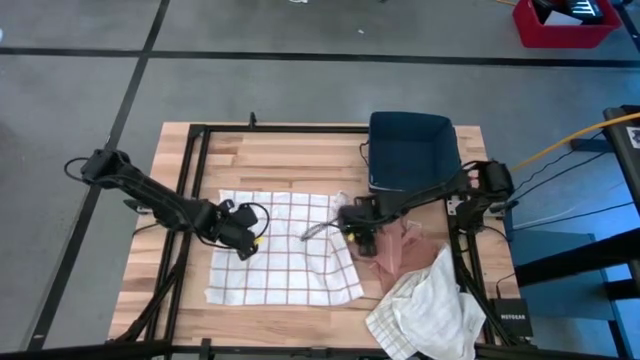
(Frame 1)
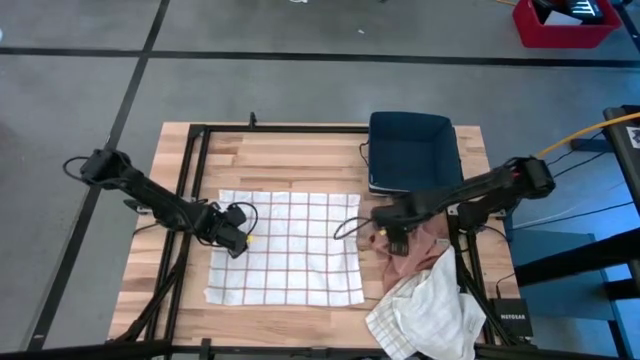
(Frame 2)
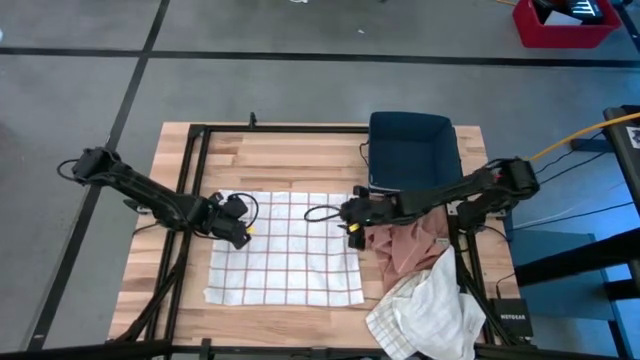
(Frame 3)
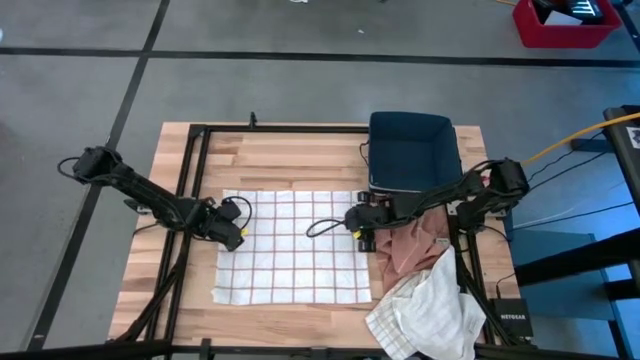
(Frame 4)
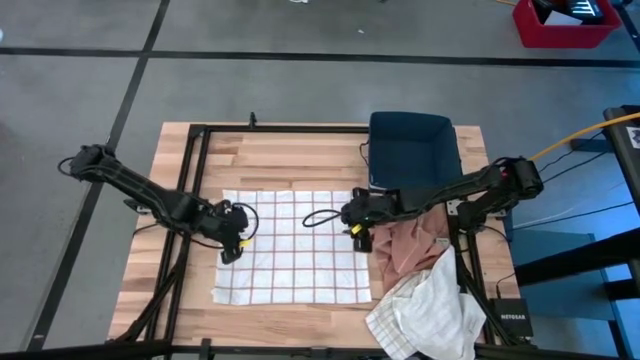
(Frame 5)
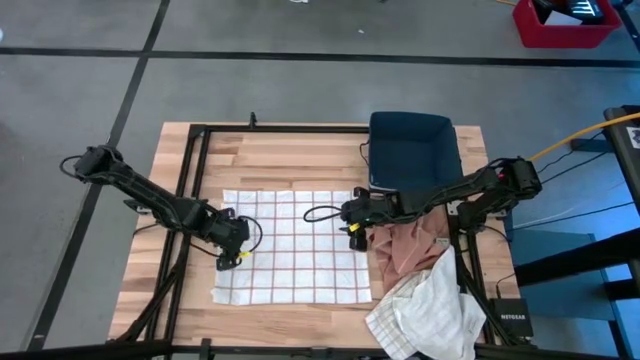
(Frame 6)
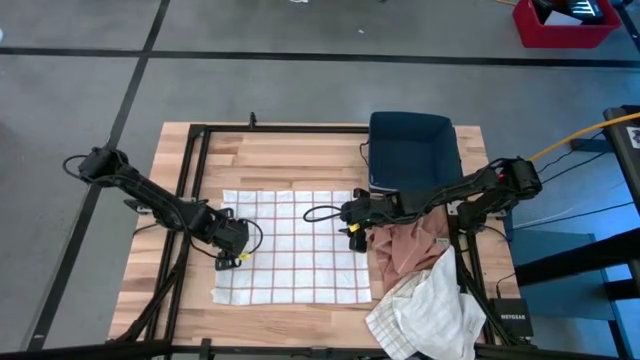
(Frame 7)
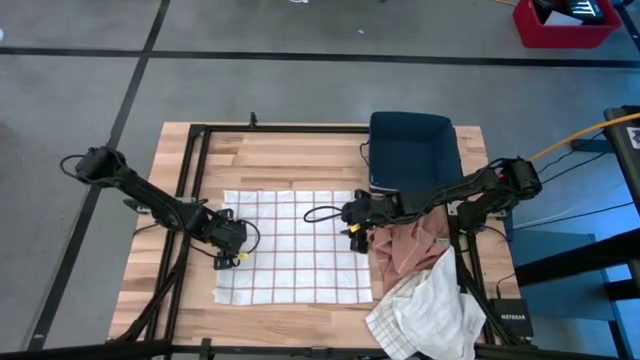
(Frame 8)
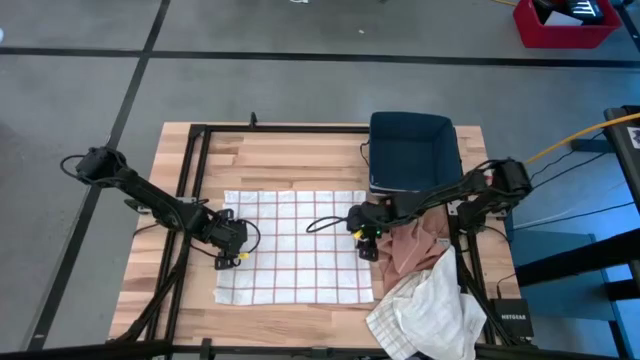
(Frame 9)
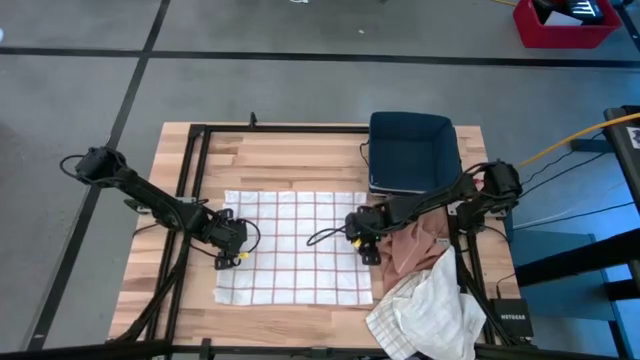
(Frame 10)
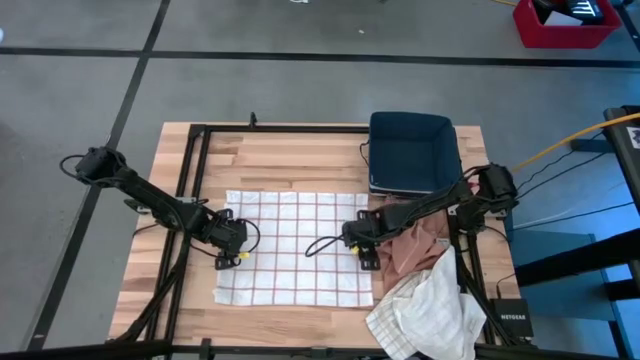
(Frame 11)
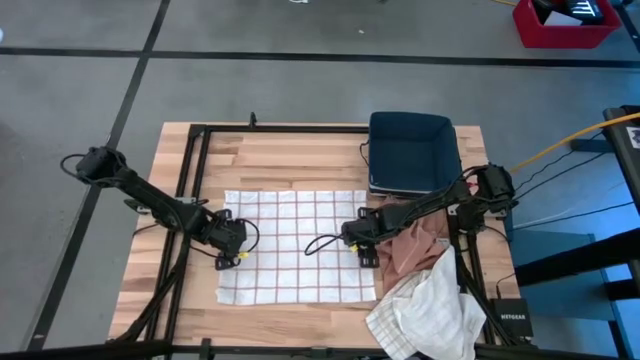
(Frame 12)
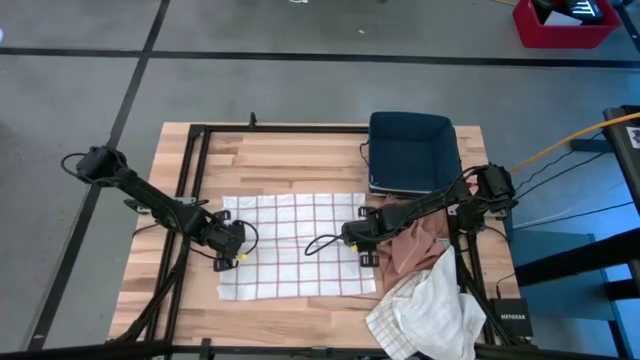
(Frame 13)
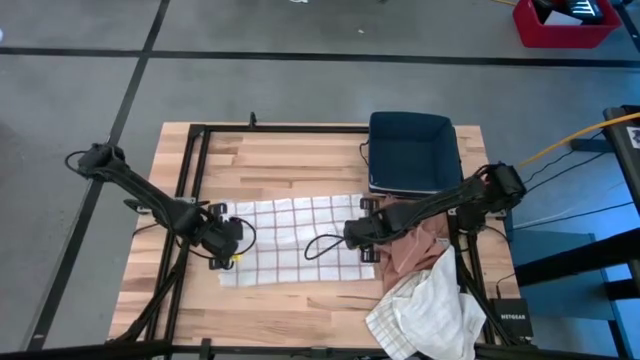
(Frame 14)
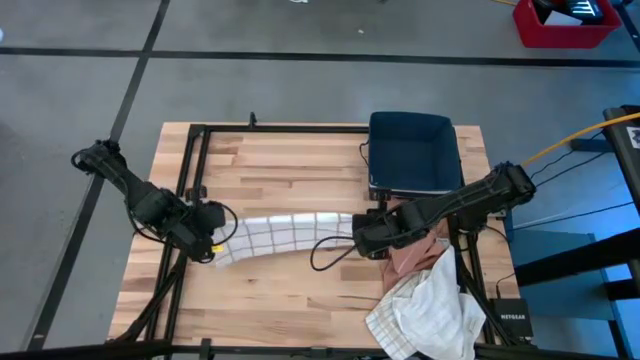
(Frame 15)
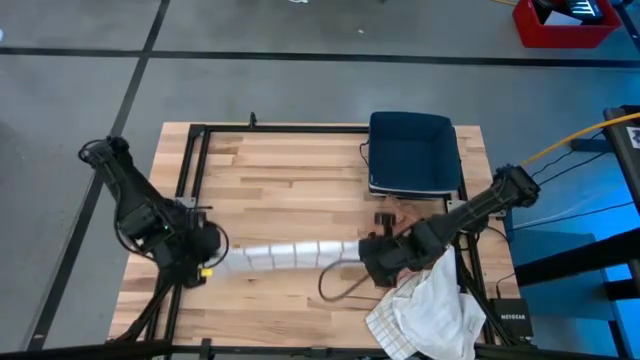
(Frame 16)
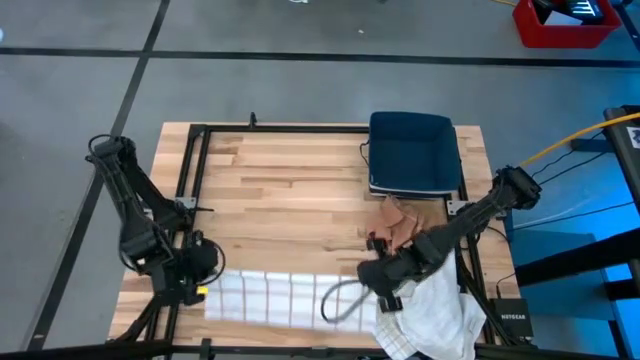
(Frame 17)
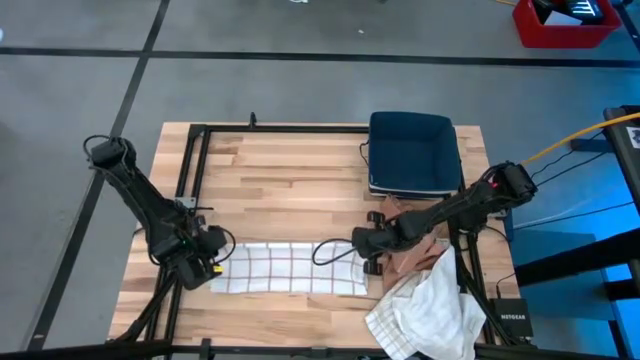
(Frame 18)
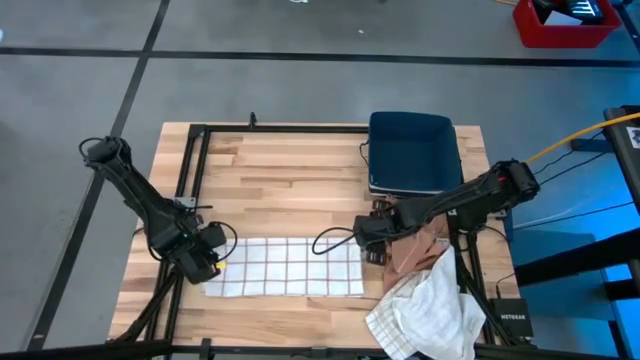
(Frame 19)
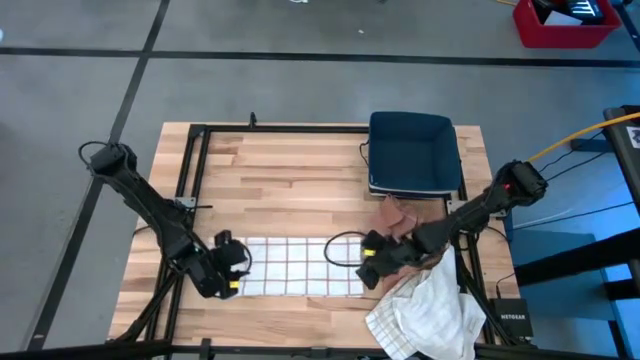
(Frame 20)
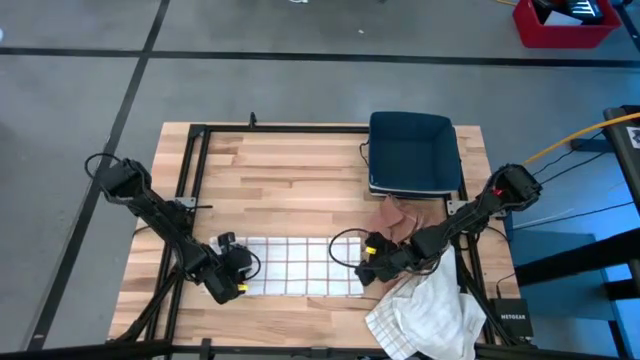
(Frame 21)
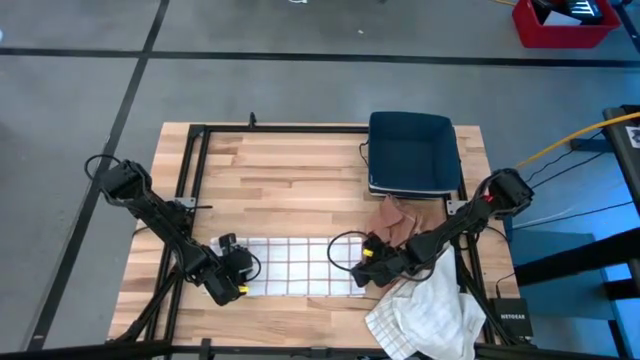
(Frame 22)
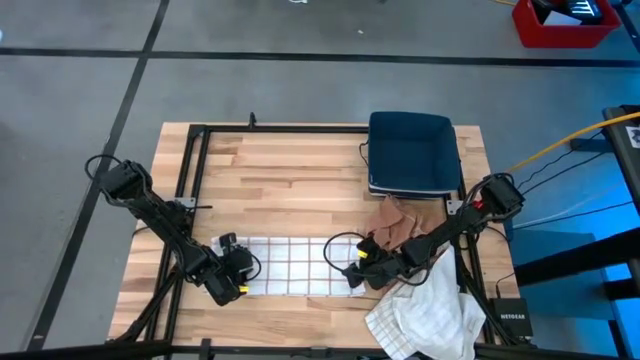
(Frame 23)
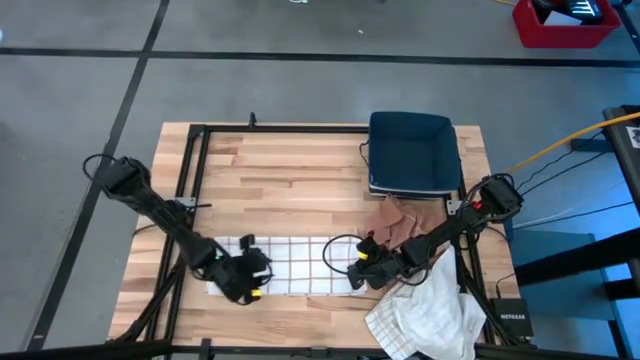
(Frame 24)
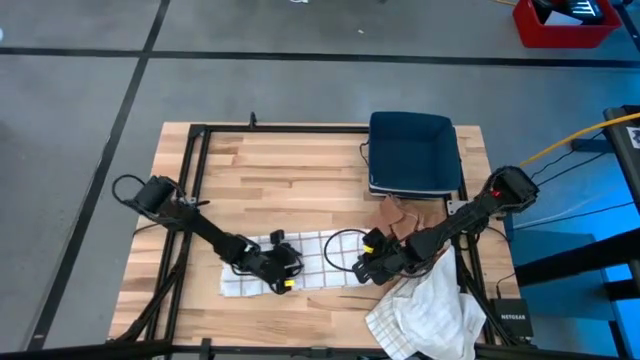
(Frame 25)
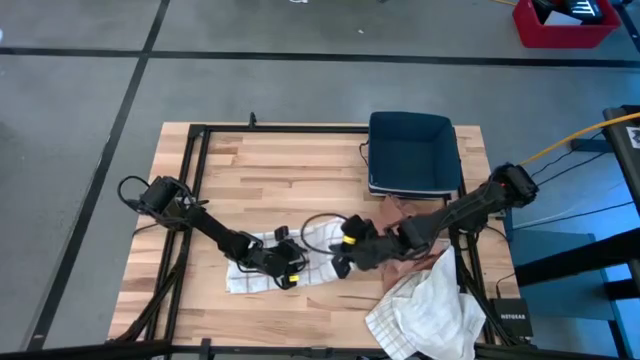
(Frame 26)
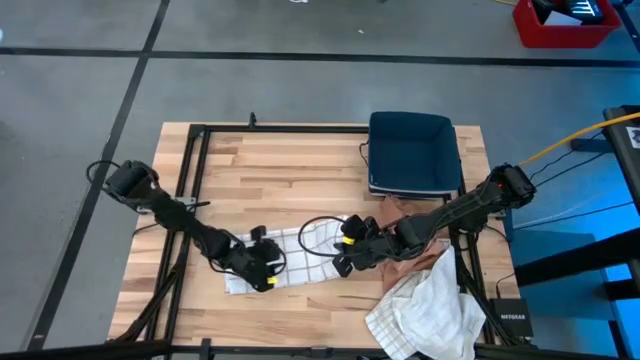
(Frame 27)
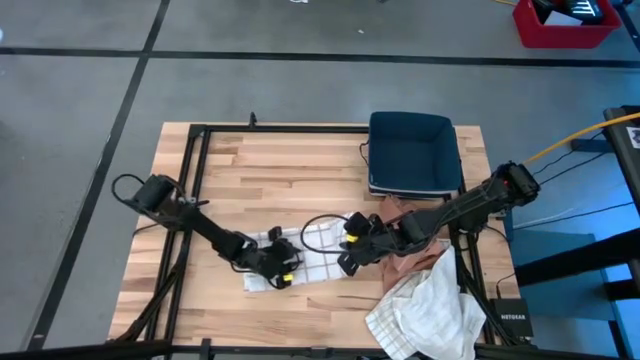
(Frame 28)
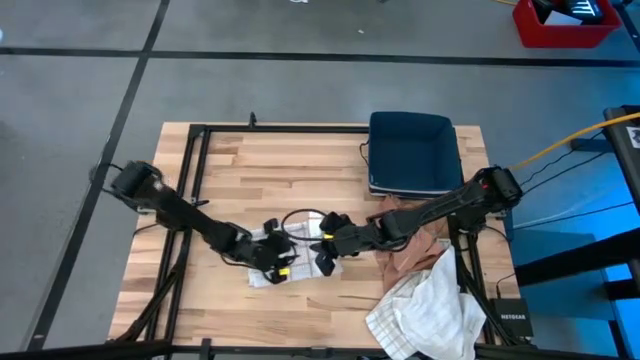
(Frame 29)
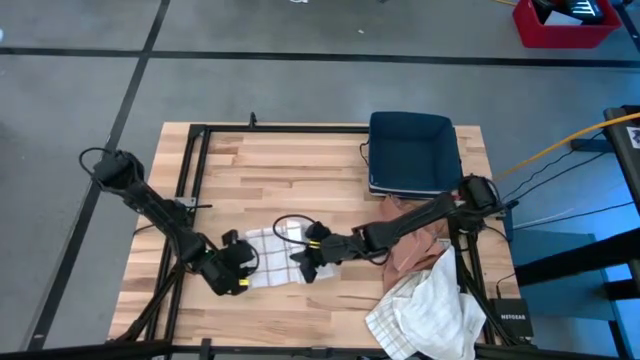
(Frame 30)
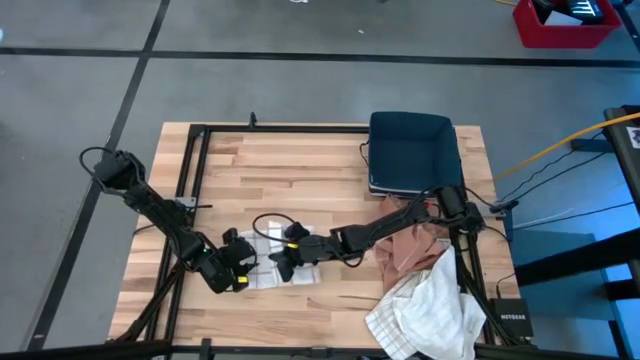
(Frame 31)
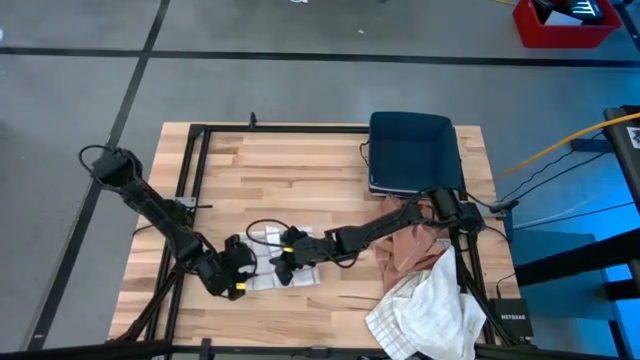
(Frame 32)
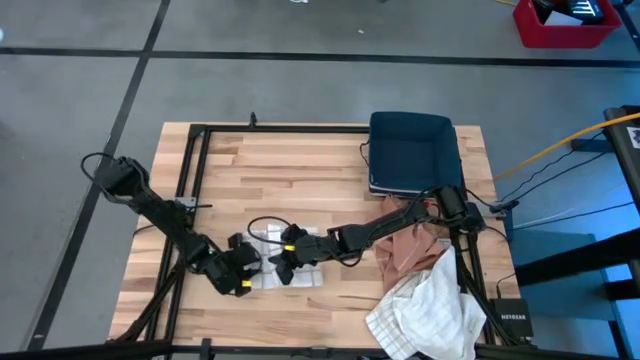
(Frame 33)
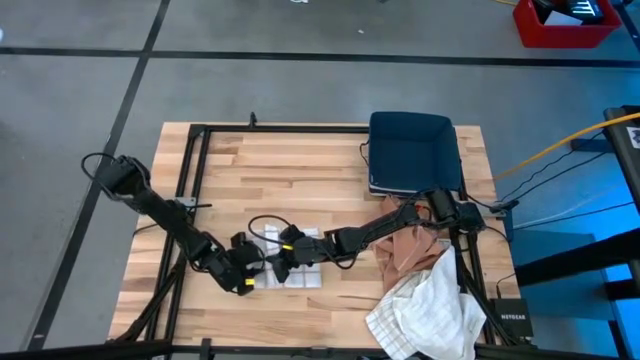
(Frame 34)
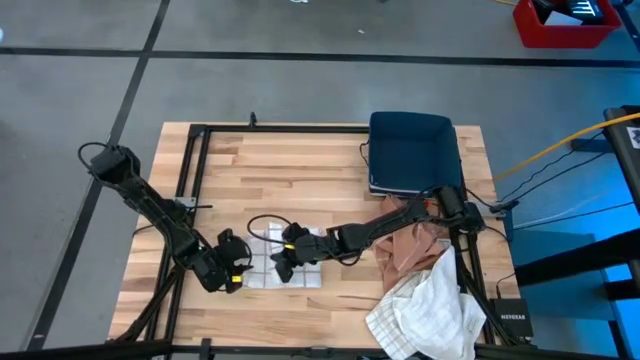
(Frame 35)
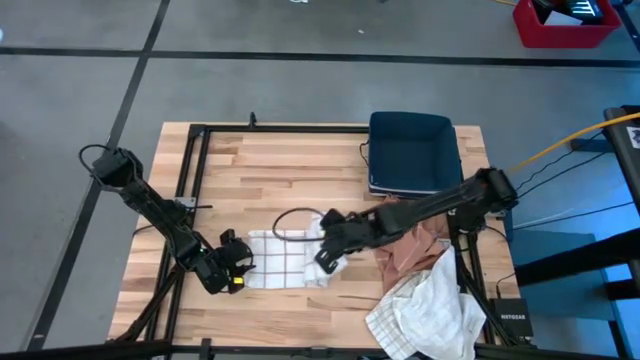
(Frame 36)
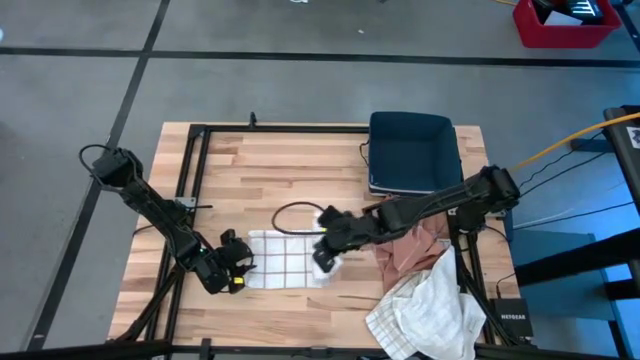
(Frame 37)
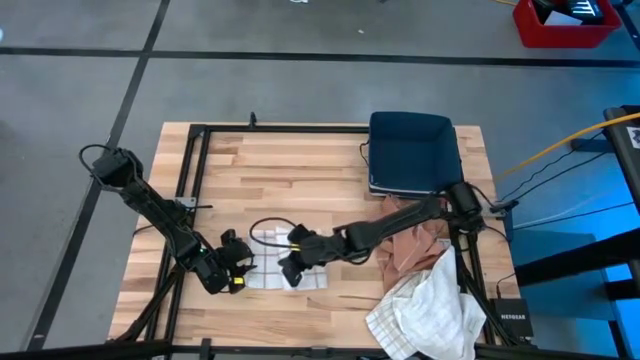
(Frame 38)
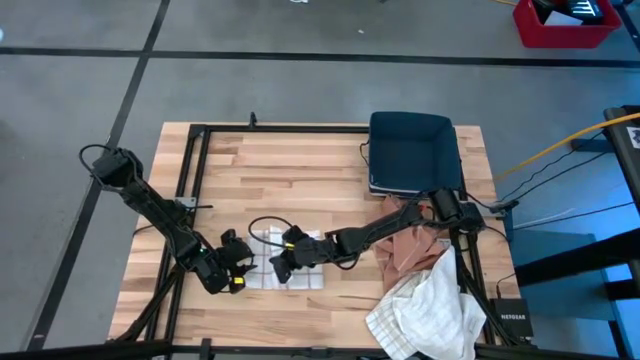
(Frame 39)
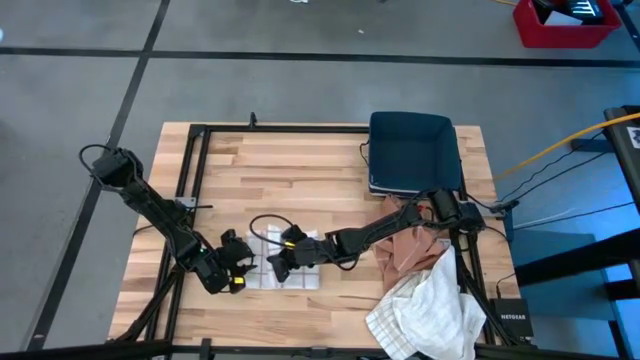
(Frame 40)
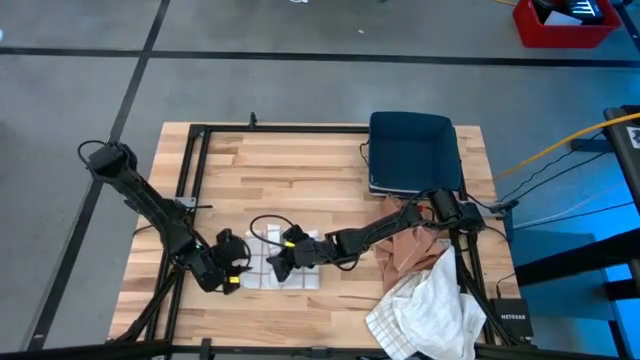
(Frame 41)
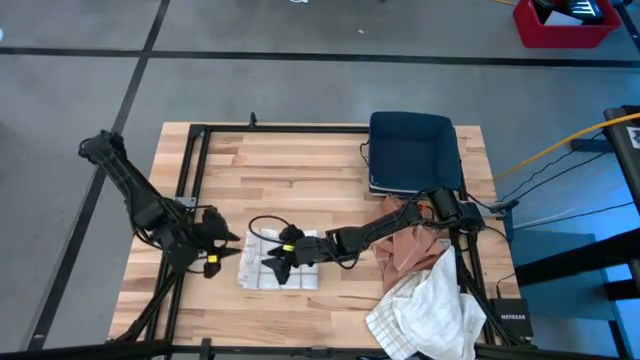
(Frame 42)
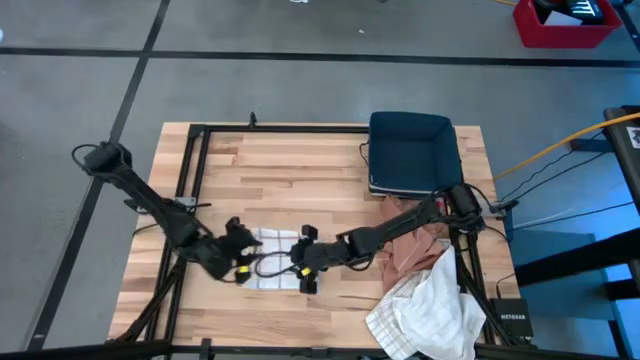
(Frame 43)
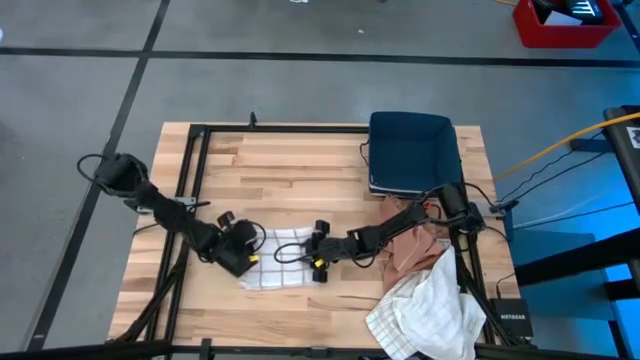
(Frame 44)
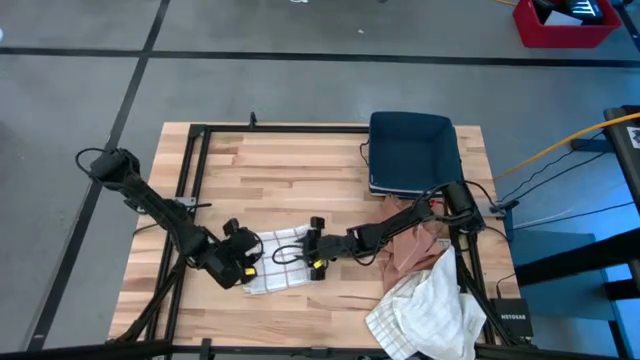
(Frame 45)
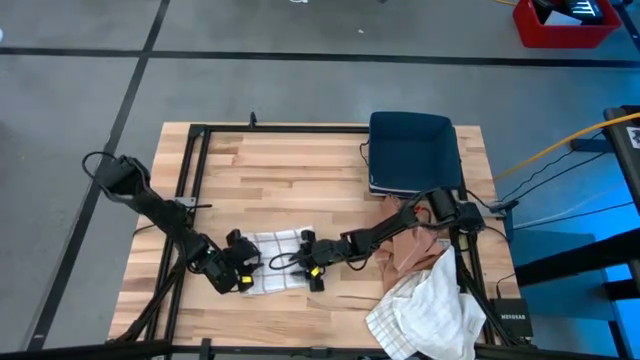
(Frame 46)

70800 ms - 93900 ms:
Task: Fold towel
Fold the brown striped towel on the table
